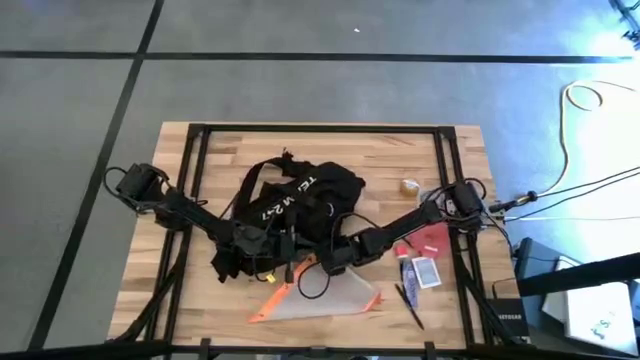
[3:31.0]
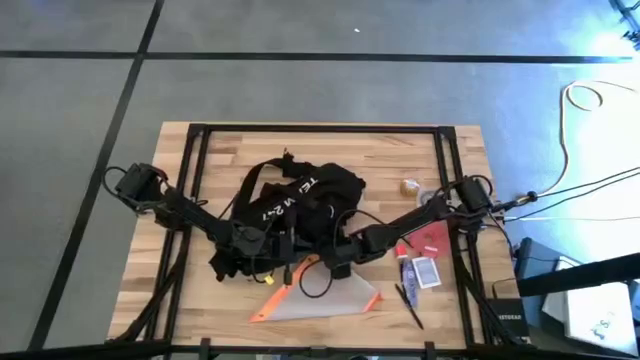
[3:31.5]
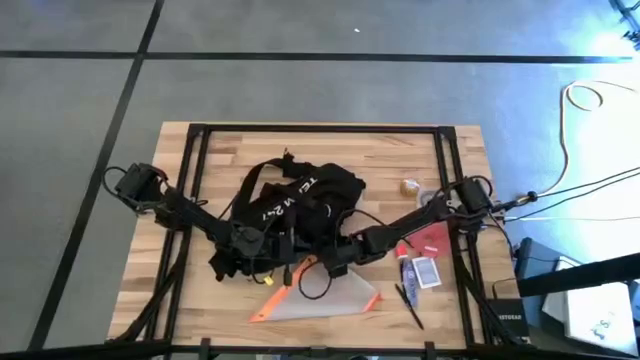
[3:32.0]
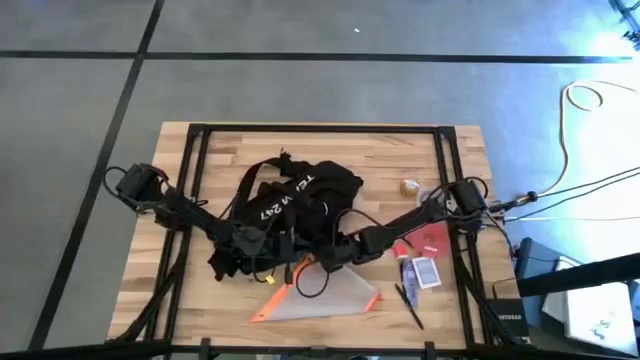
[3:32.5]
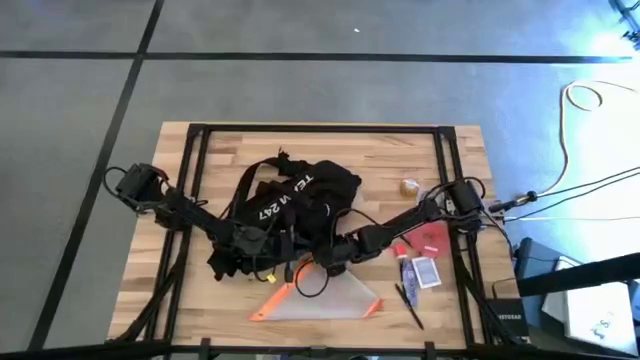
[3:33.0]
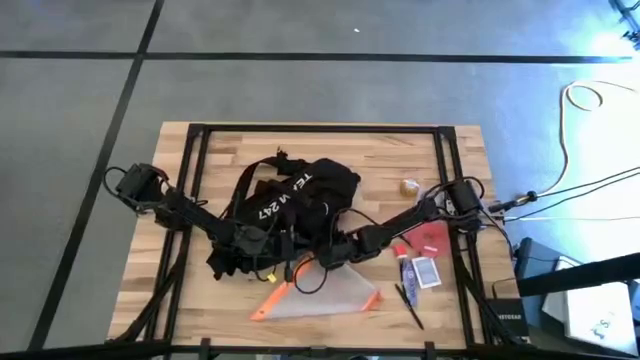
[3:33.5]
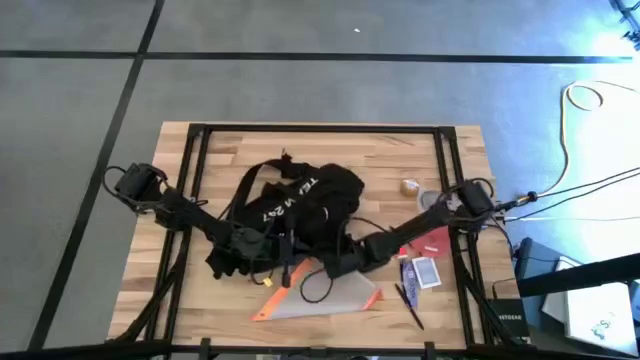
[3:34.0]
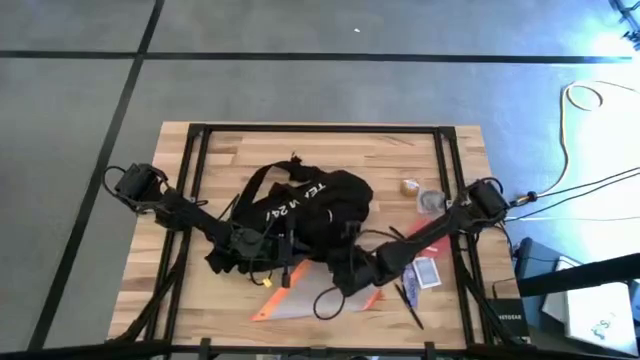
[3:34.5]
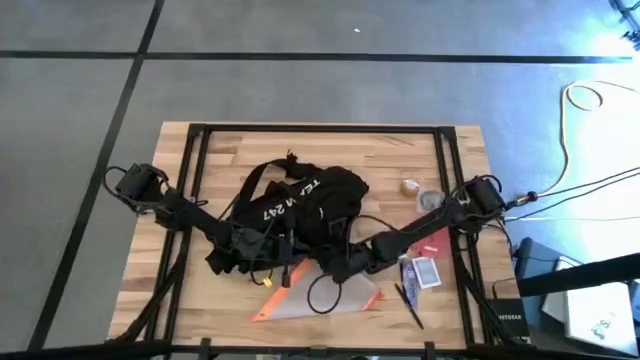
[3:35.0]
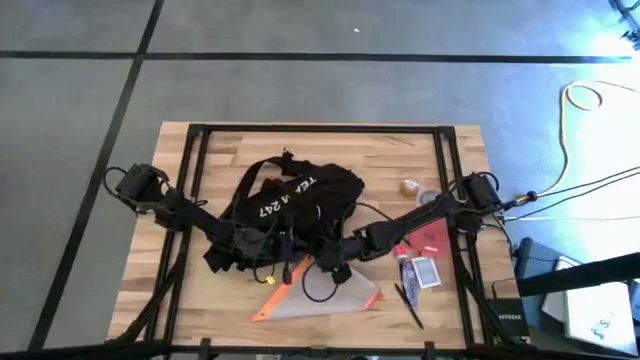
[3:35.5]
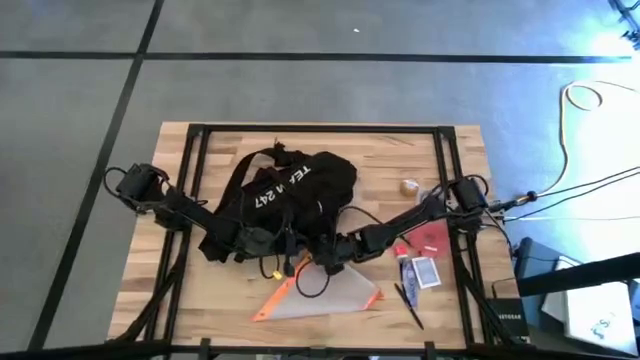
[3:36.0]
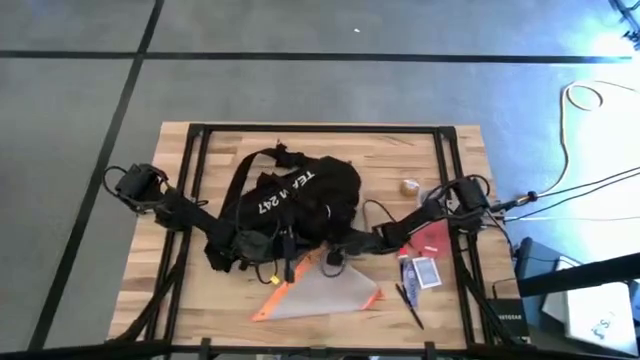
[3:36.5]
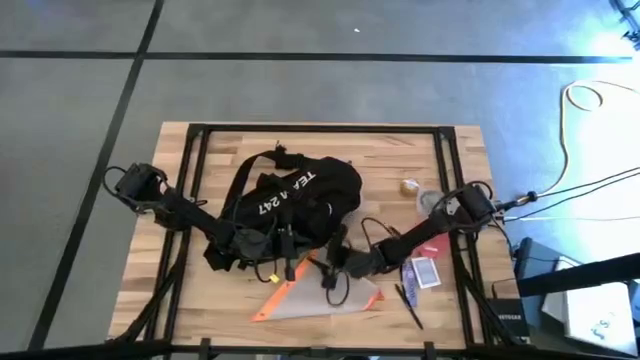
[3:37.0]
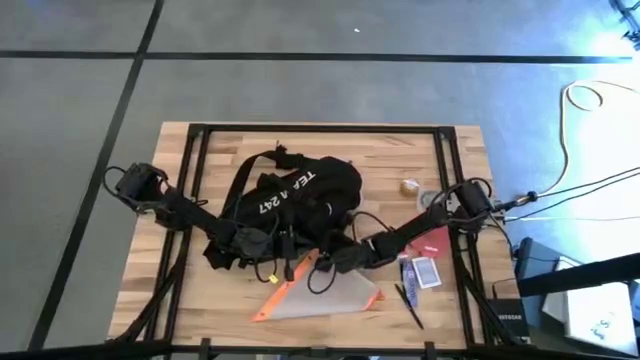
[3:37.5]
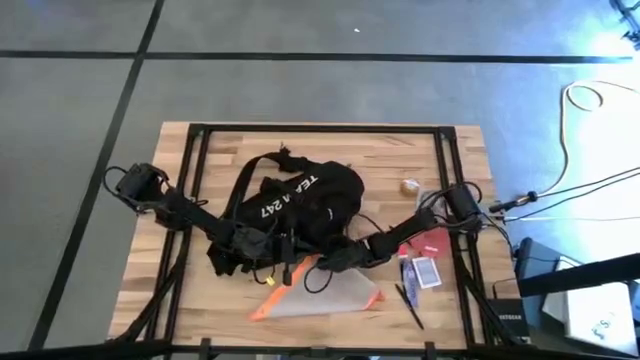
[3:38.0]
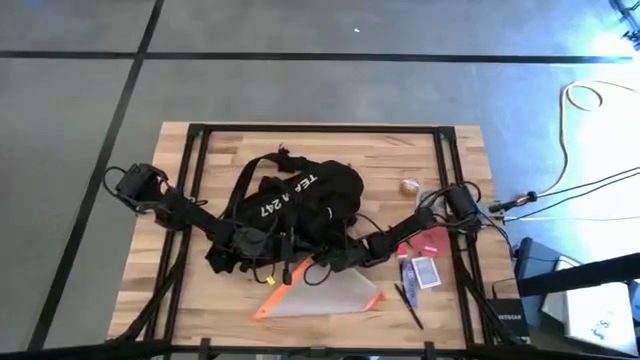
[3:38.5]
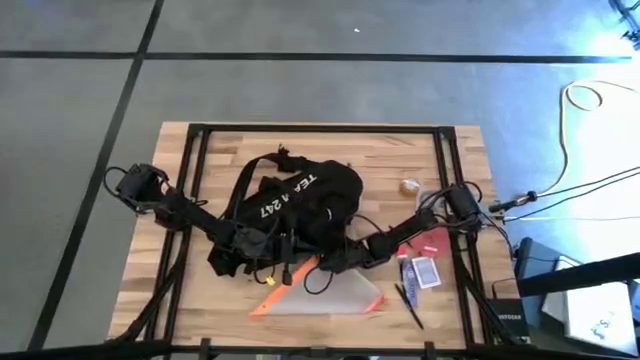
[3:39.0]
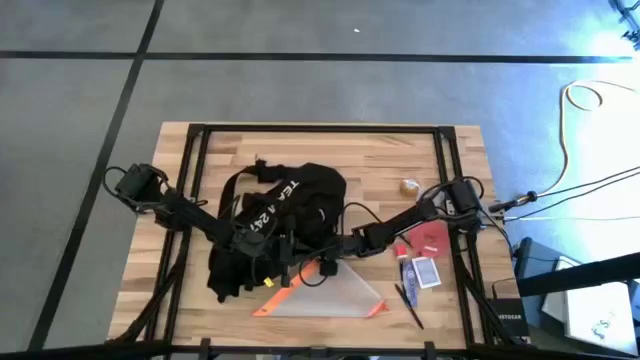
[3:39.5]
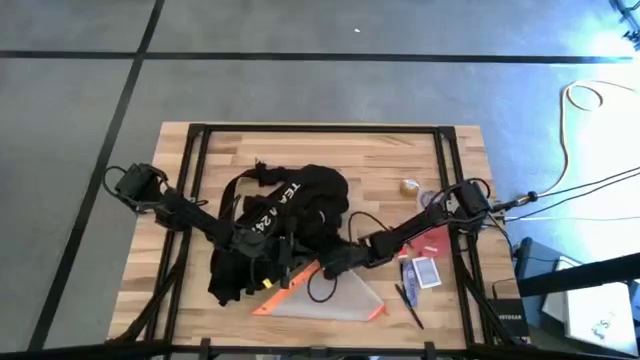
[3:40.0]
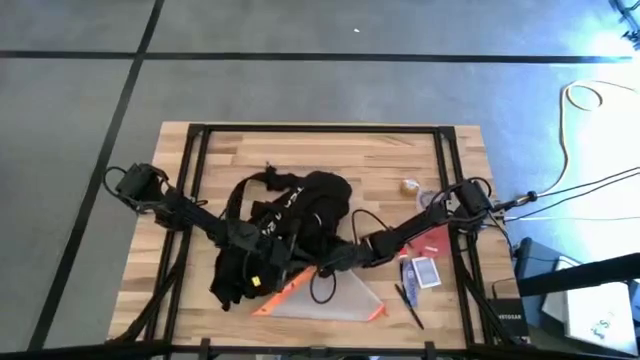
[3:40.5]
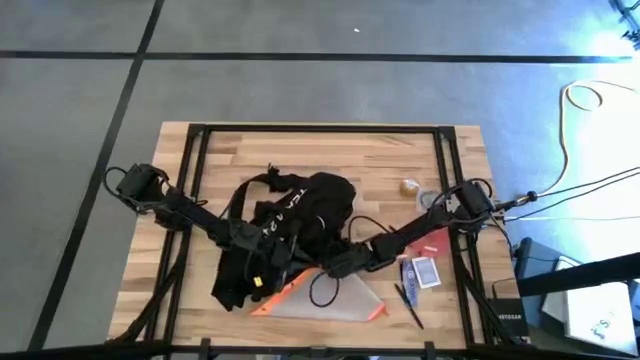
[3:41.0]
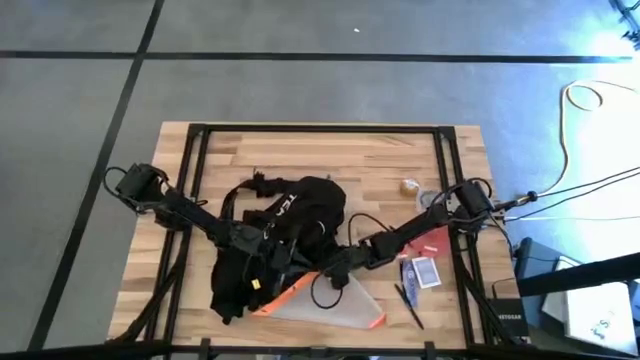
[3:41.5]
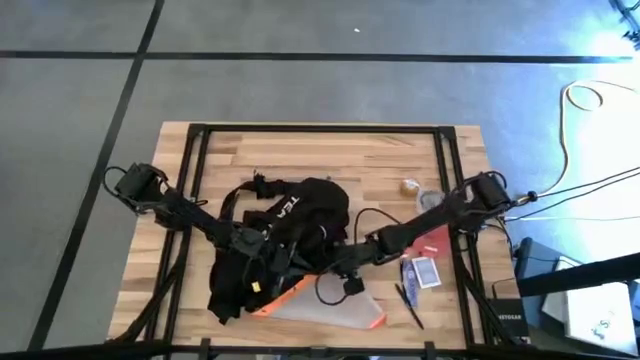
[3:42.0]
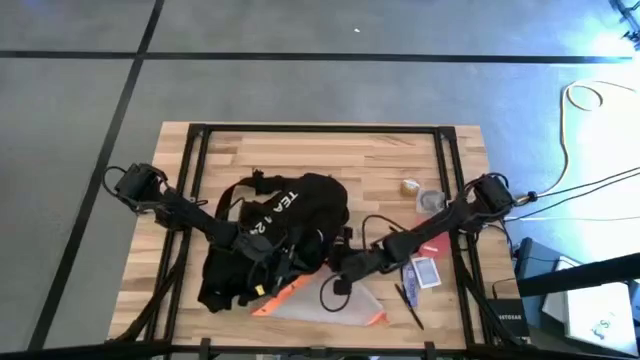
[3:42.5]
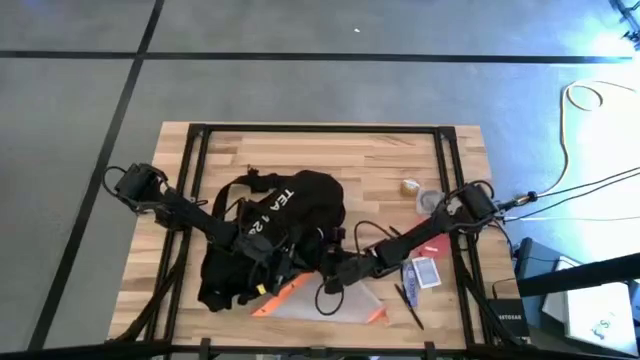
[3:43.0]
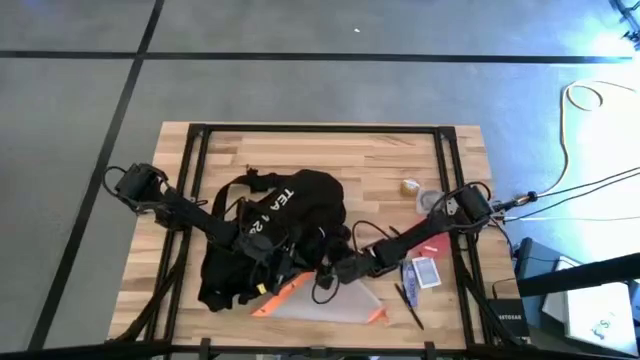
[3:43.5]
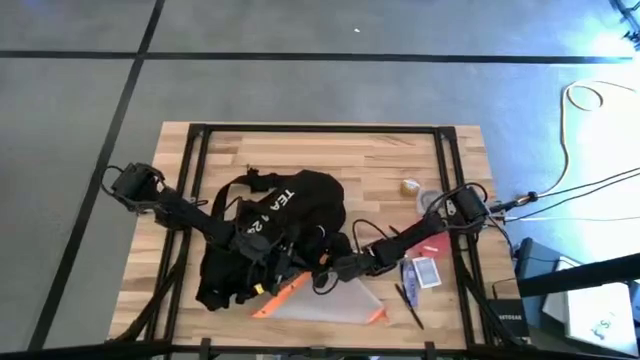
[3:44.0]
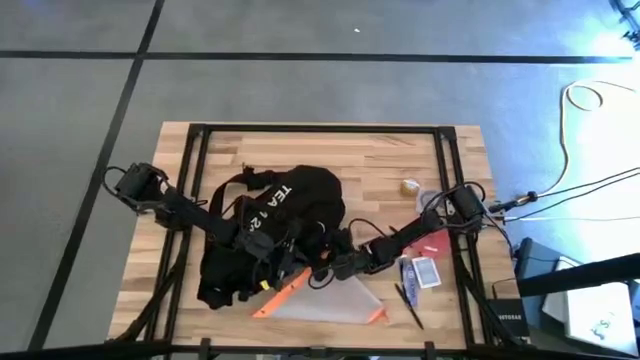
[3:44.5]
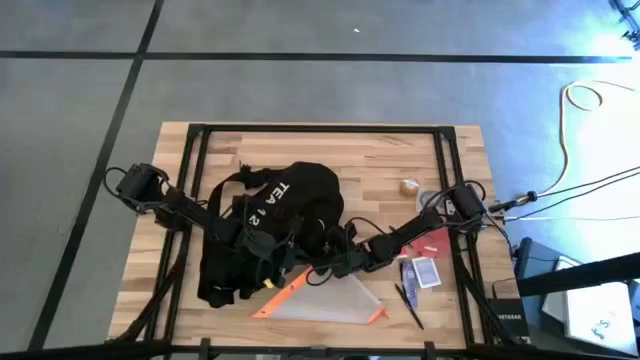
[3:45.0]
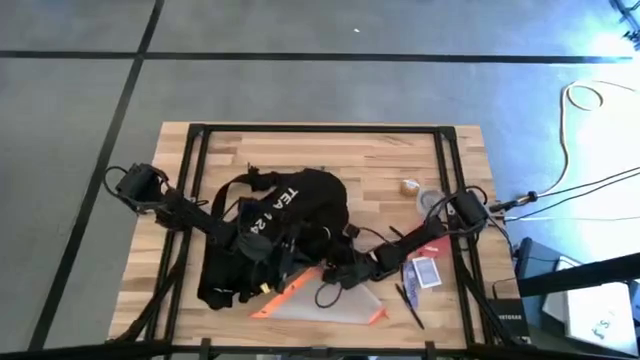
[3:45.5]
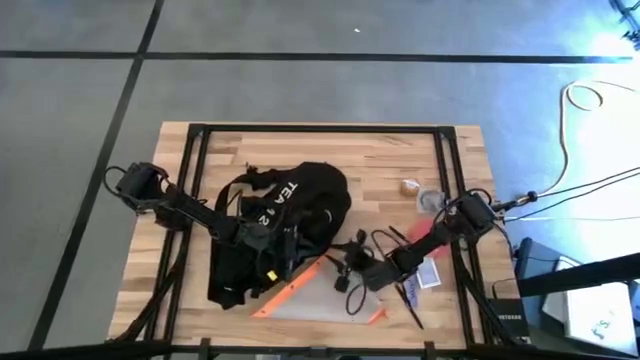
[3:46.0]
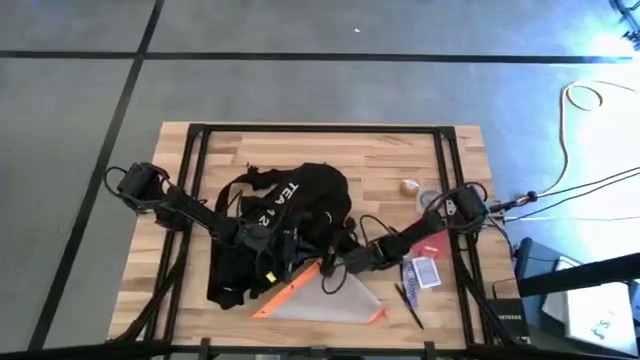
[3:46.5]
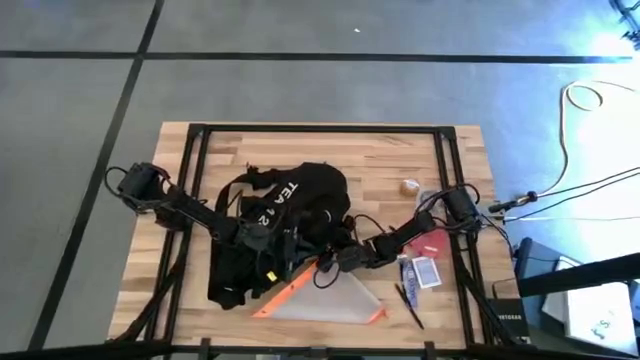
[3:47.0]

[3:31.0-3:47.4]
Task: Unpack backpack
Remove the white charger cable from the black bag

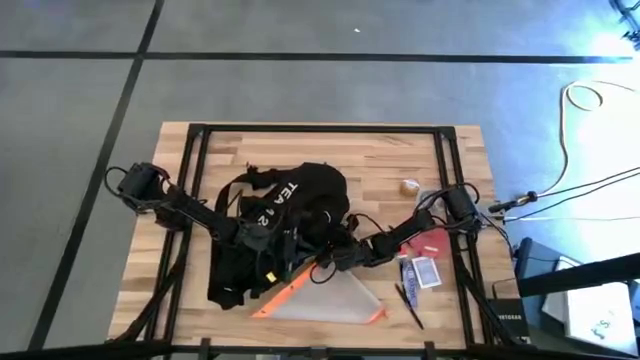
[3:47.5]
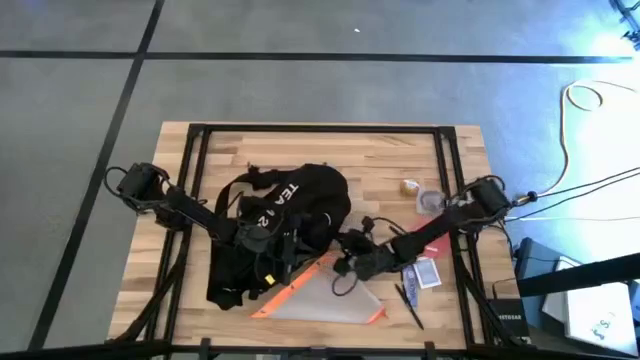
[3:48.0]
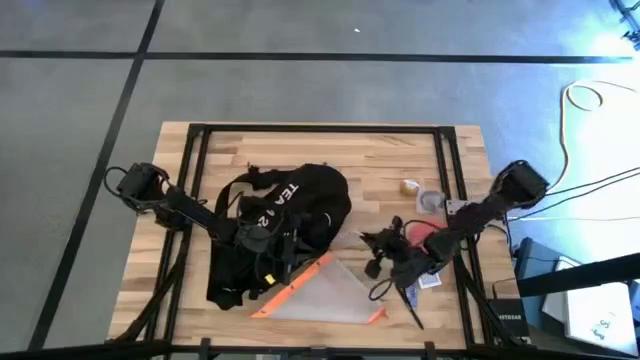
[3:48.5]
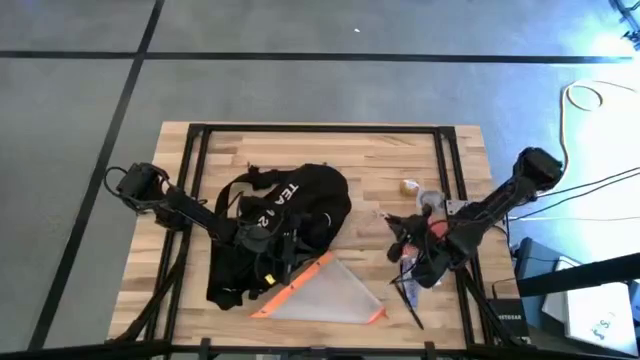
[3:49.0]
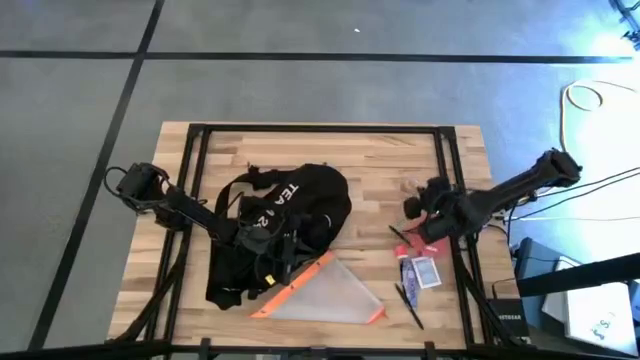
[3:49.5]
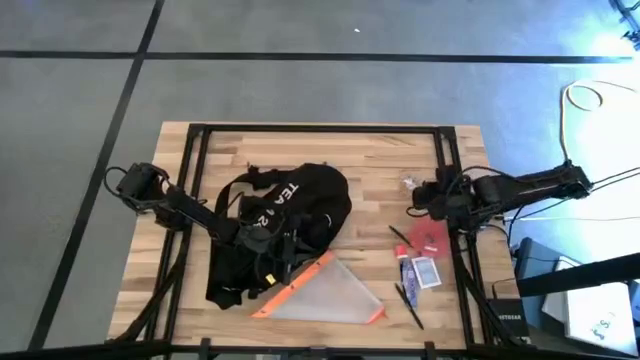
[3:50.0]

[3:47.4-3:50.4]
Remove the white charger cable from the black bag
